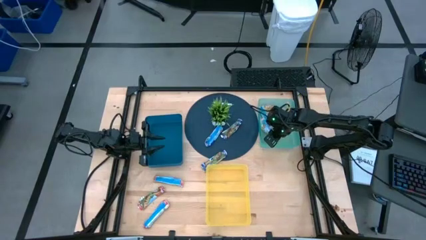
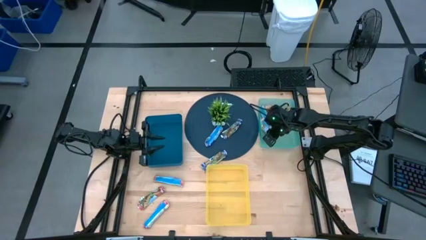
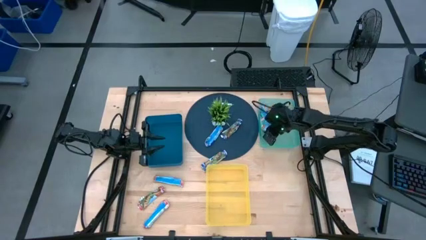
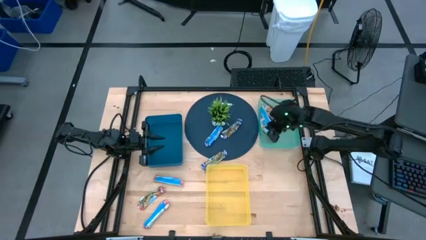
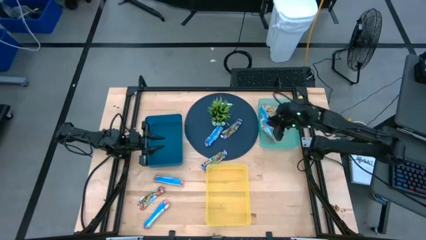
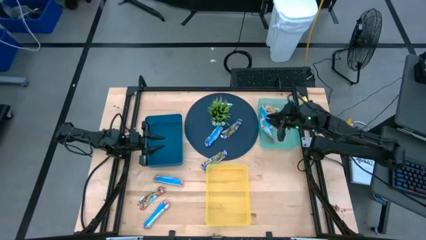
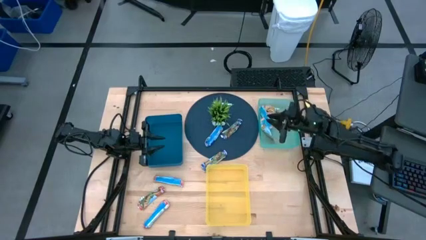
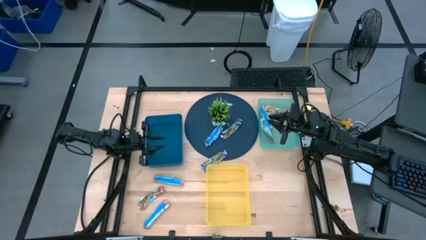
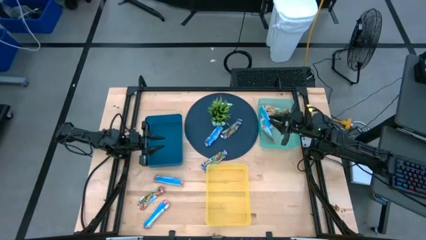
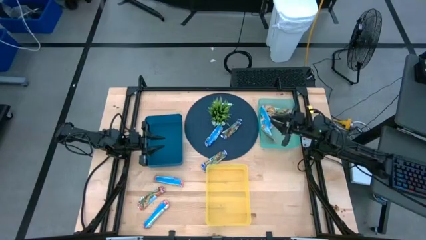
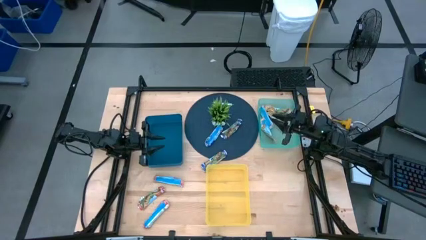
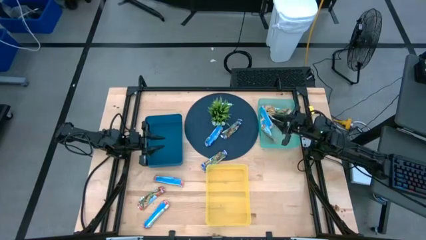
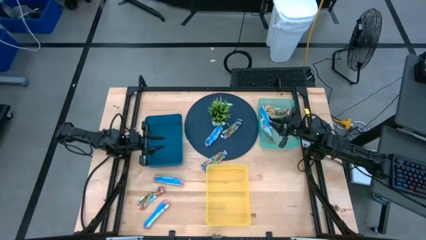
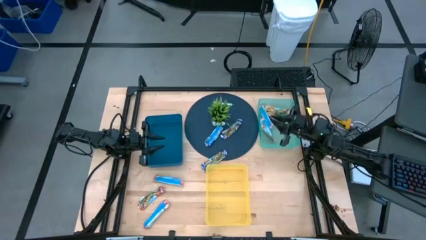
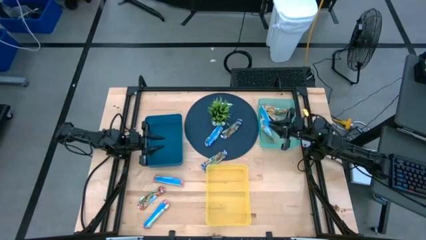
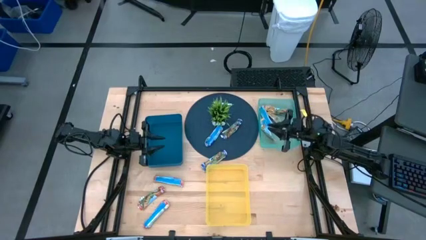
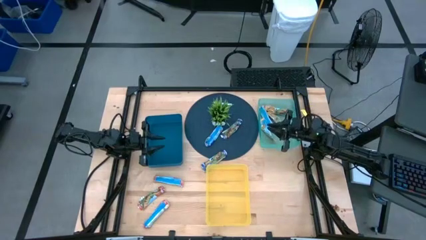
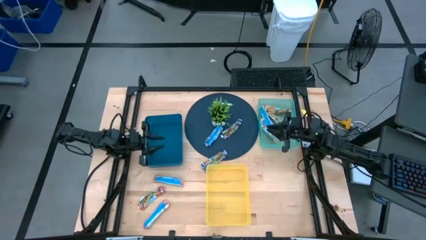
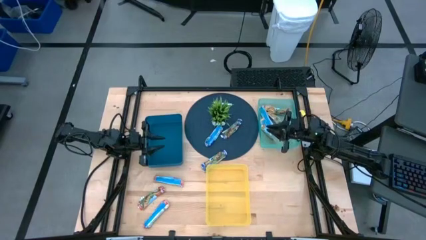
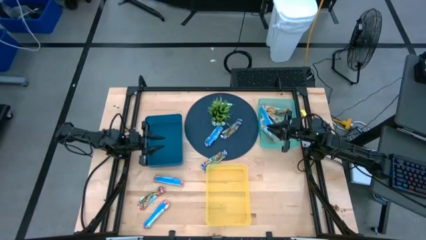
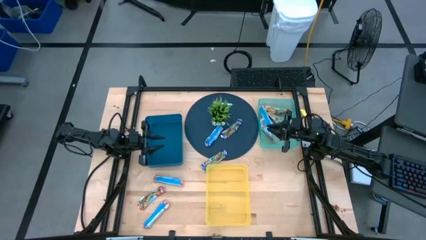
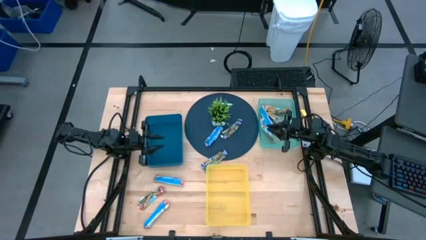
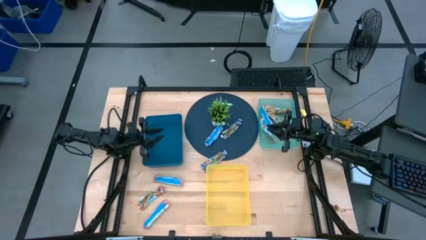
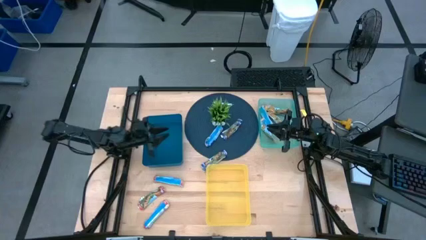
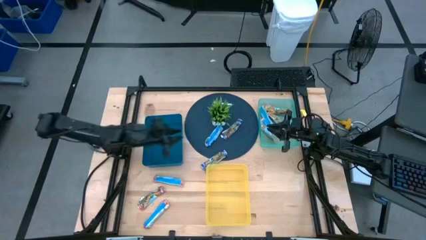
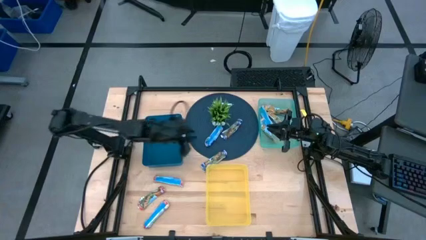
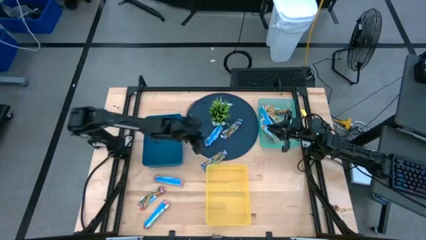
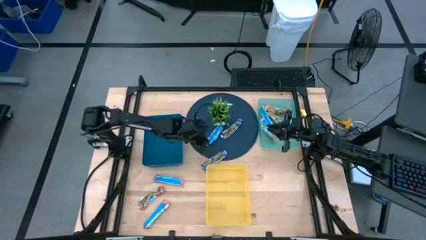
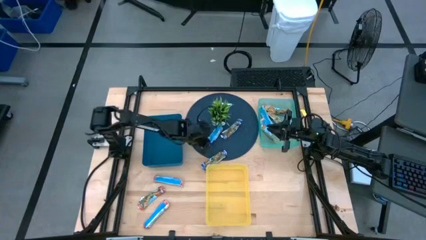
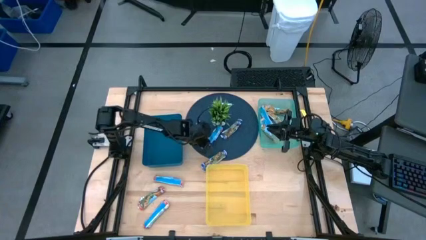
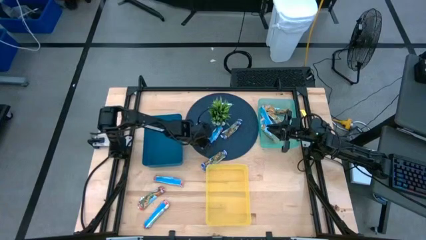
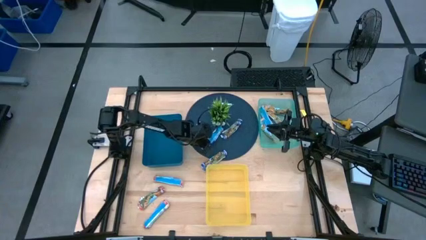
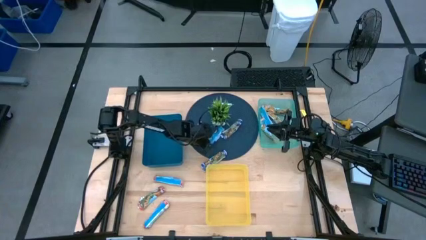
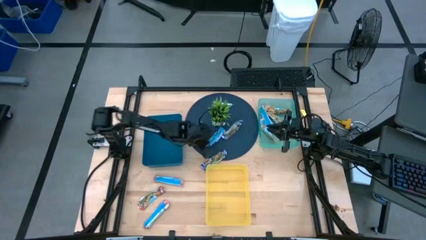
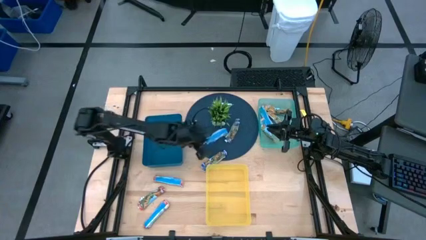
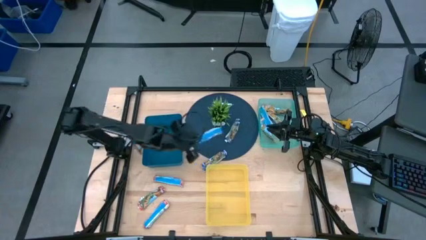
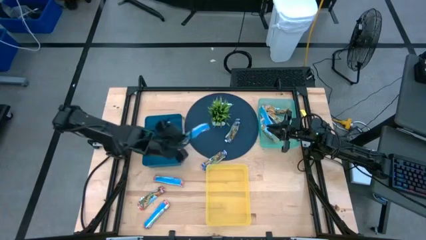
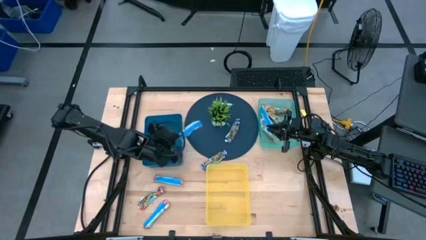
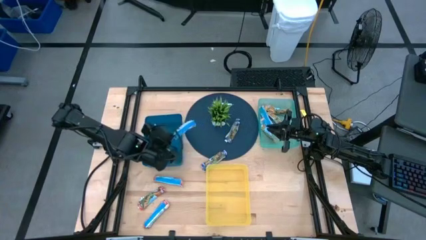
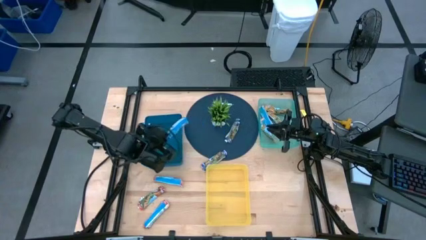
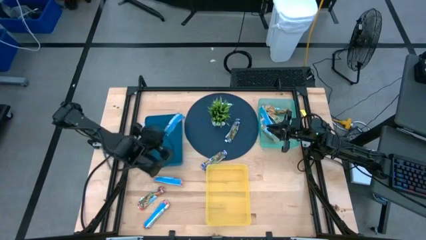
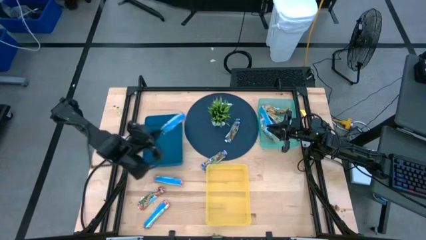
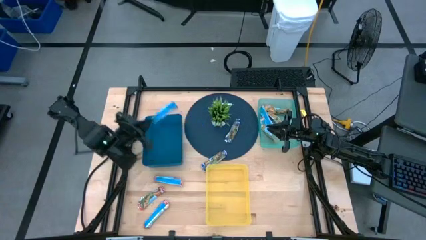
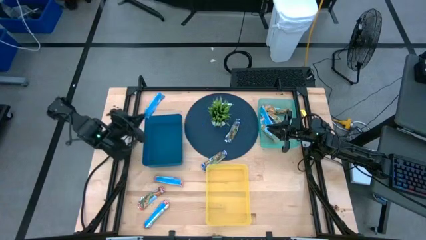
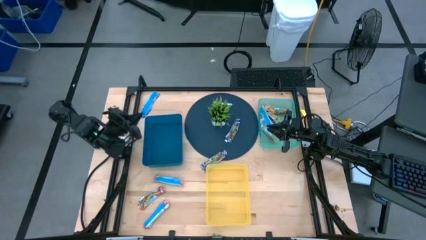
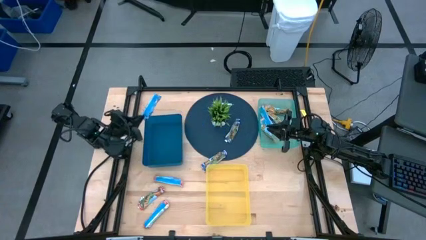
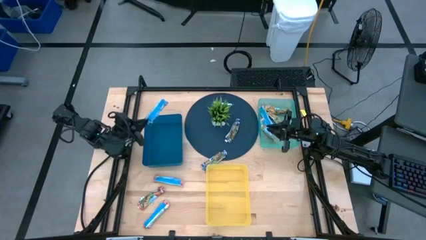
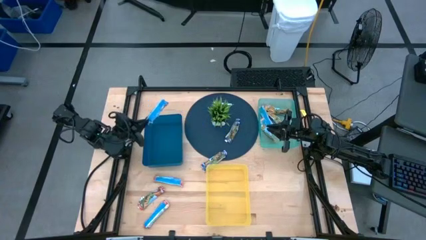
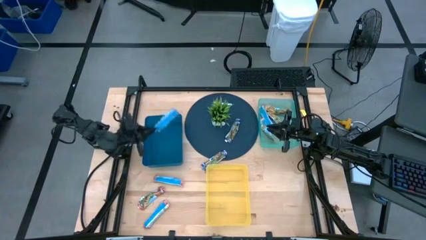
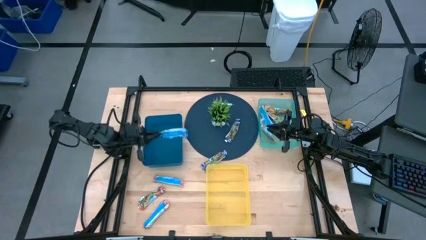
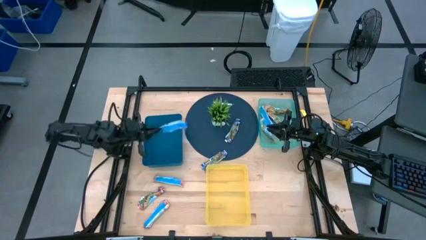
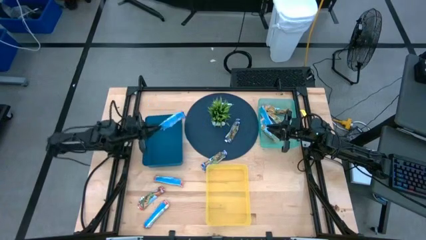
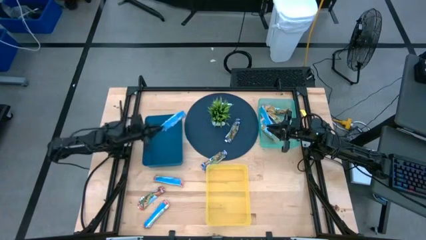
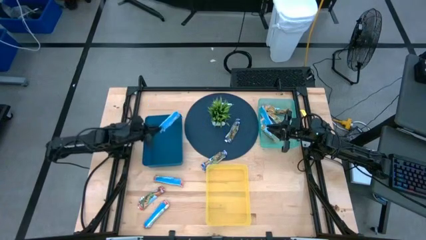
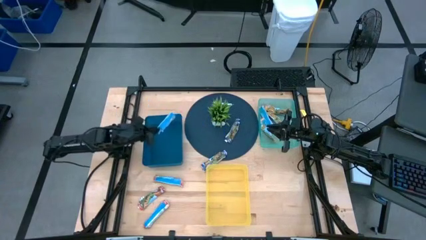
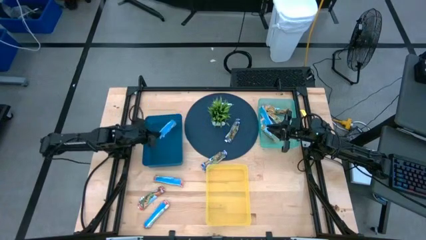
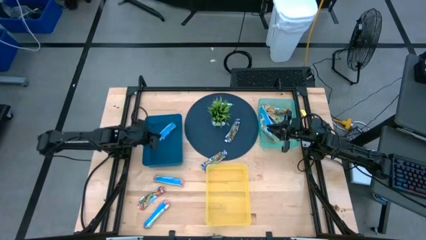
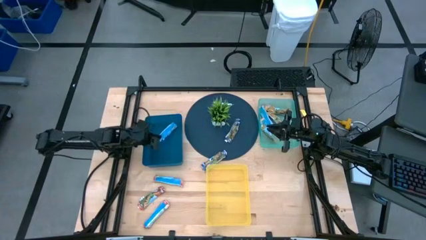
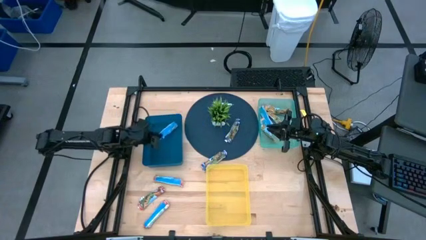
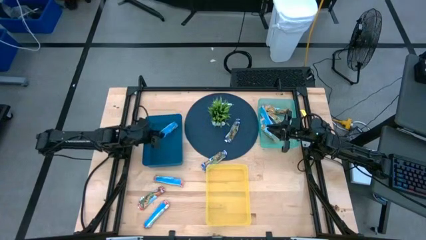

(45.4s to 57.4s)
Task: Pick and place Granola Bars by type
Put the blue granola bar into the blue bin
